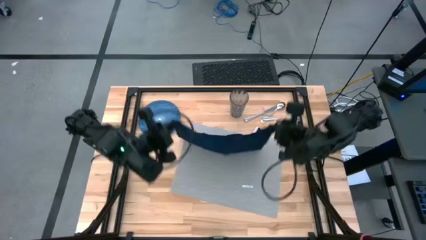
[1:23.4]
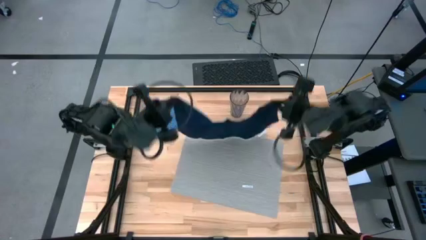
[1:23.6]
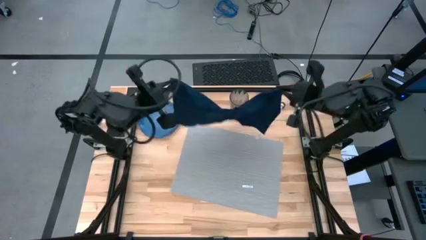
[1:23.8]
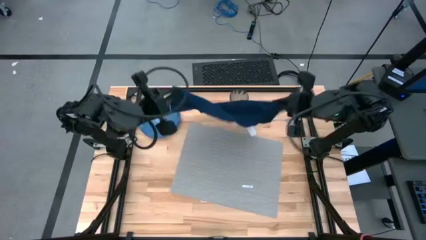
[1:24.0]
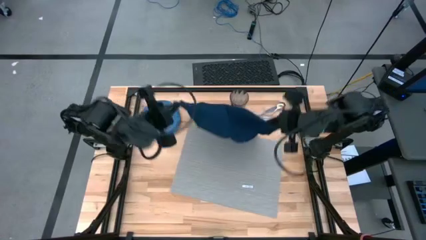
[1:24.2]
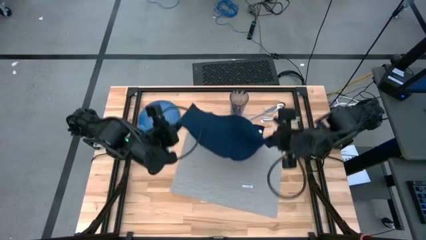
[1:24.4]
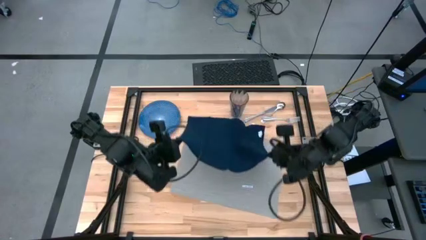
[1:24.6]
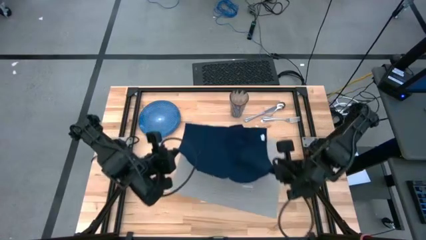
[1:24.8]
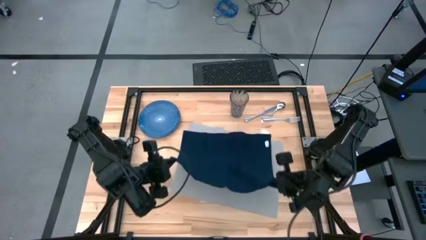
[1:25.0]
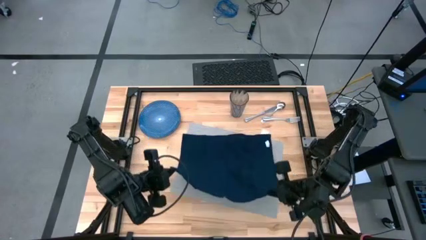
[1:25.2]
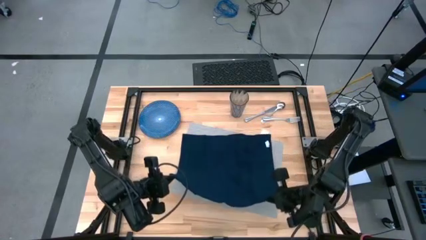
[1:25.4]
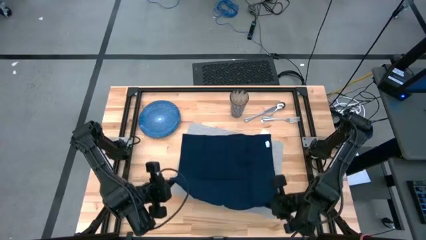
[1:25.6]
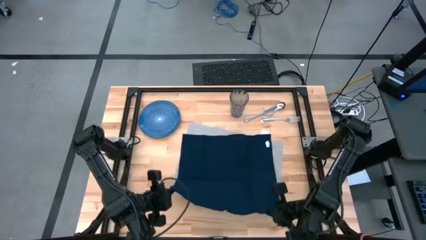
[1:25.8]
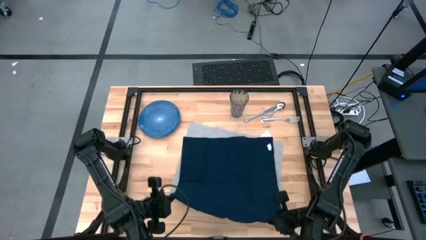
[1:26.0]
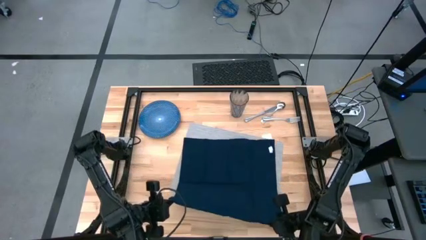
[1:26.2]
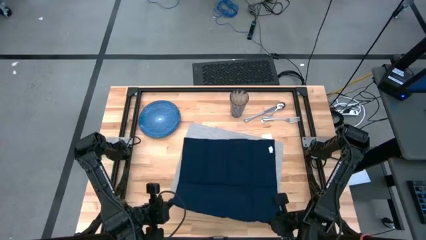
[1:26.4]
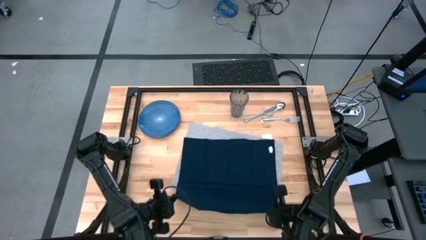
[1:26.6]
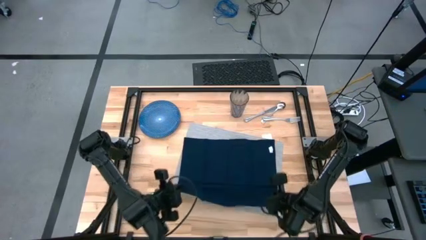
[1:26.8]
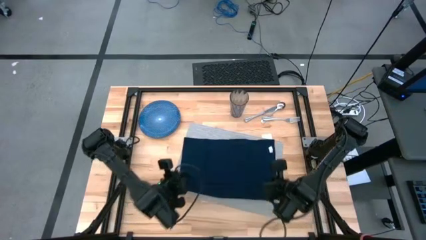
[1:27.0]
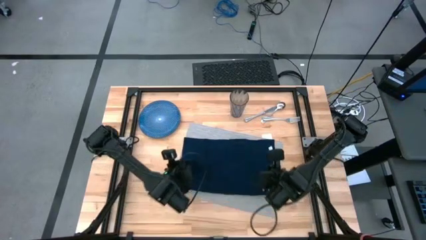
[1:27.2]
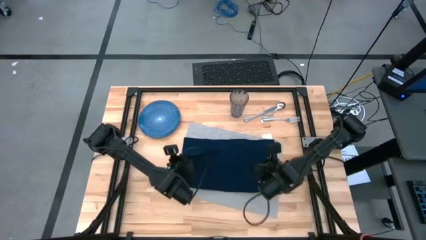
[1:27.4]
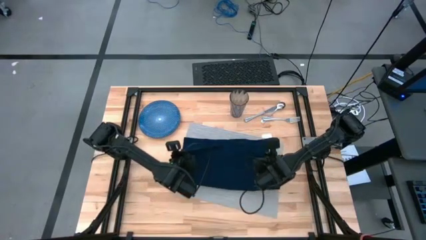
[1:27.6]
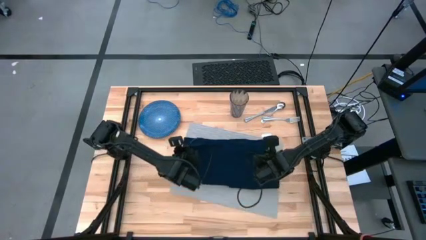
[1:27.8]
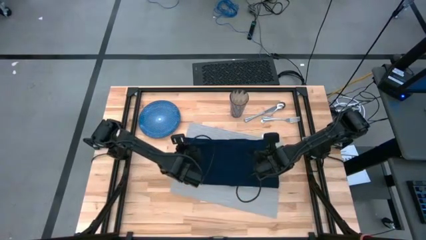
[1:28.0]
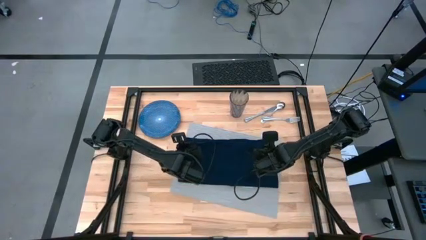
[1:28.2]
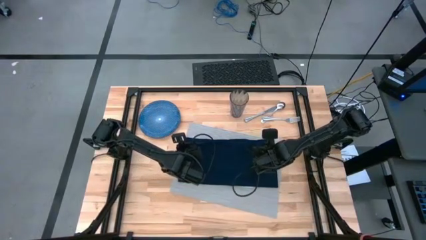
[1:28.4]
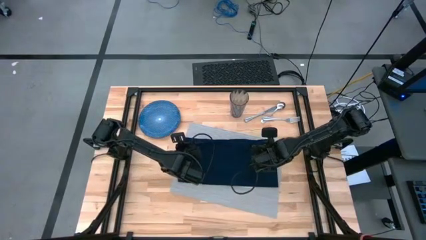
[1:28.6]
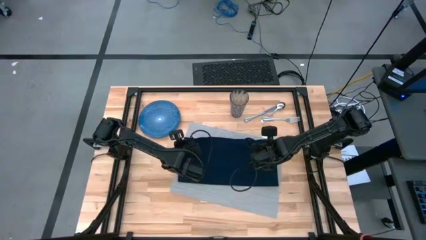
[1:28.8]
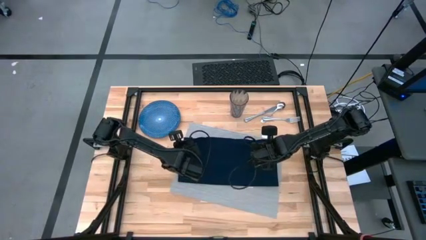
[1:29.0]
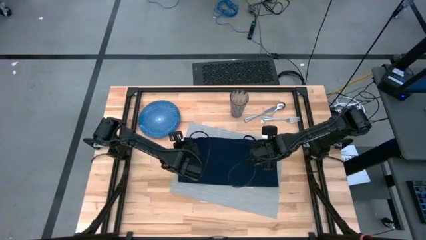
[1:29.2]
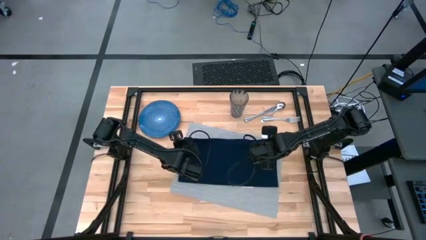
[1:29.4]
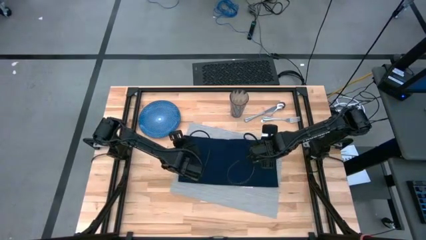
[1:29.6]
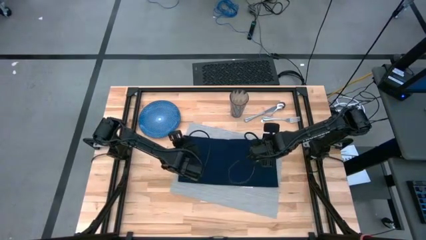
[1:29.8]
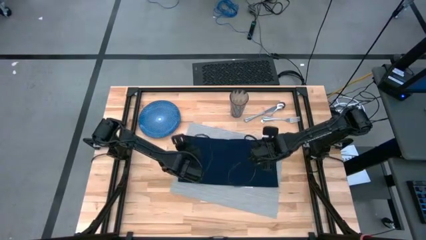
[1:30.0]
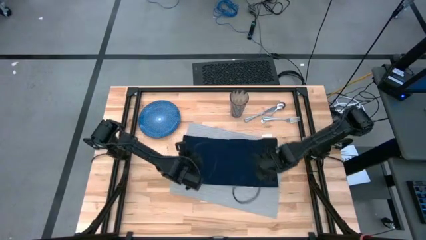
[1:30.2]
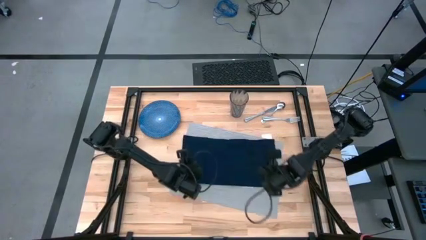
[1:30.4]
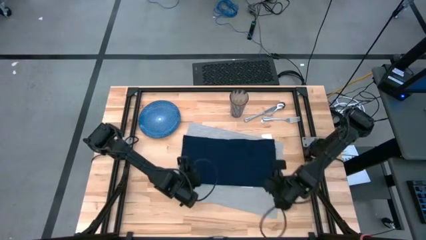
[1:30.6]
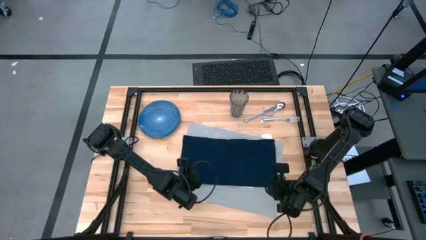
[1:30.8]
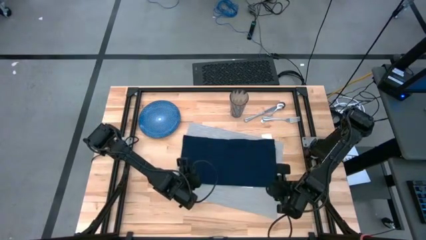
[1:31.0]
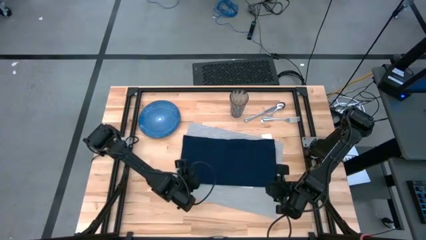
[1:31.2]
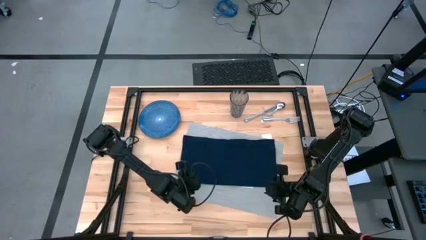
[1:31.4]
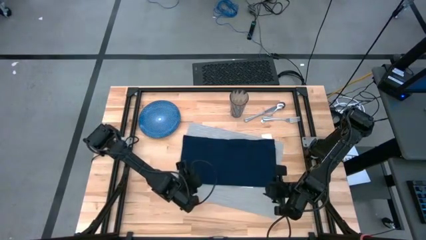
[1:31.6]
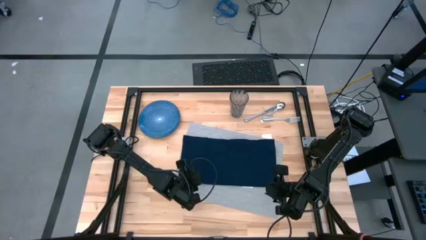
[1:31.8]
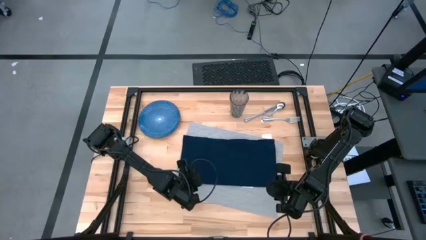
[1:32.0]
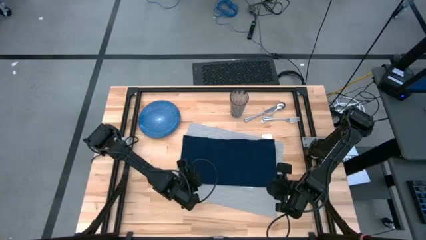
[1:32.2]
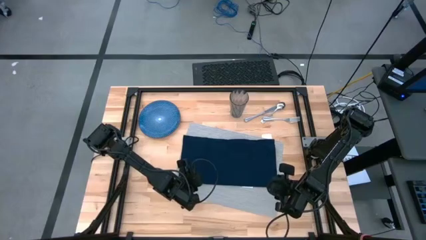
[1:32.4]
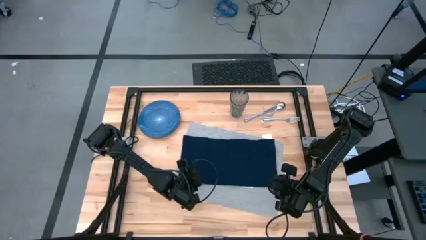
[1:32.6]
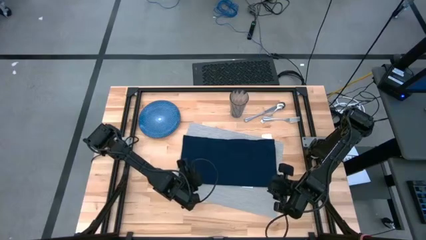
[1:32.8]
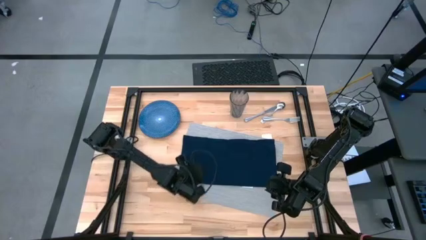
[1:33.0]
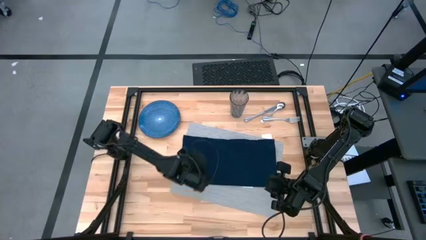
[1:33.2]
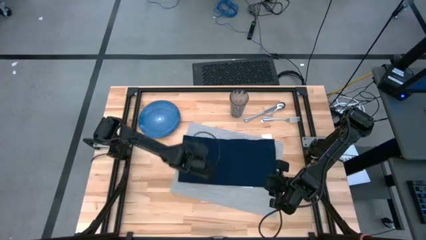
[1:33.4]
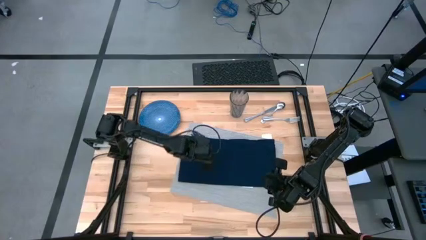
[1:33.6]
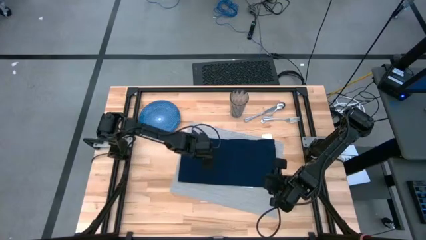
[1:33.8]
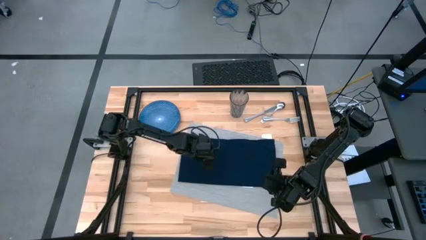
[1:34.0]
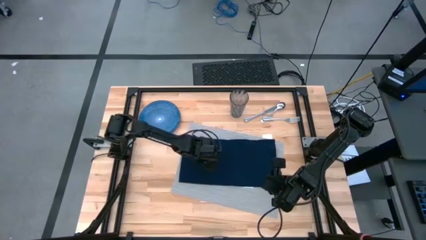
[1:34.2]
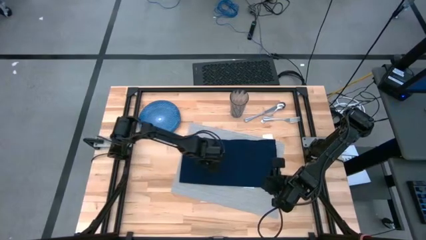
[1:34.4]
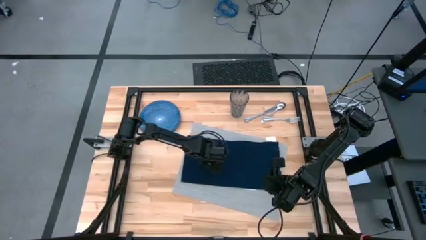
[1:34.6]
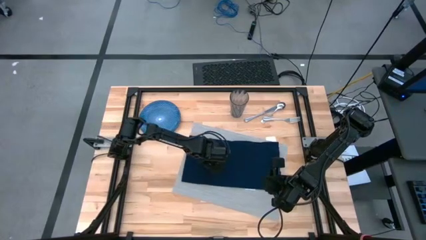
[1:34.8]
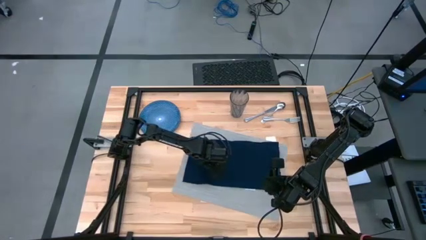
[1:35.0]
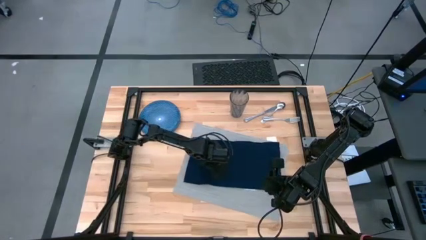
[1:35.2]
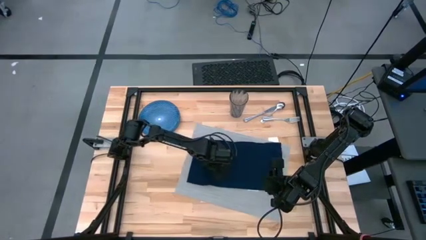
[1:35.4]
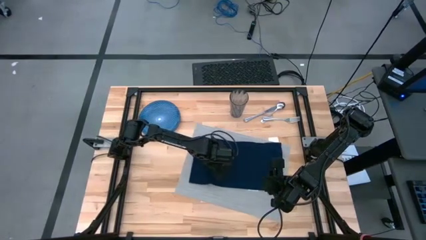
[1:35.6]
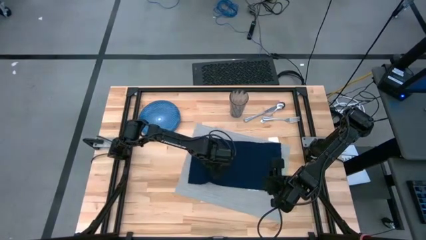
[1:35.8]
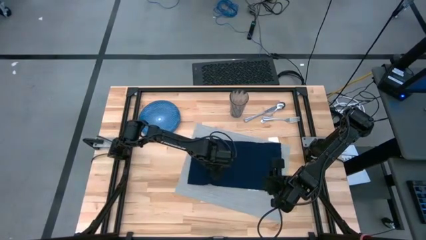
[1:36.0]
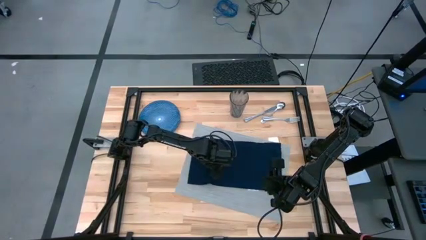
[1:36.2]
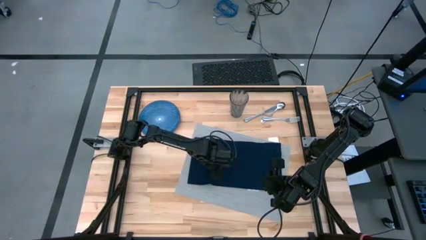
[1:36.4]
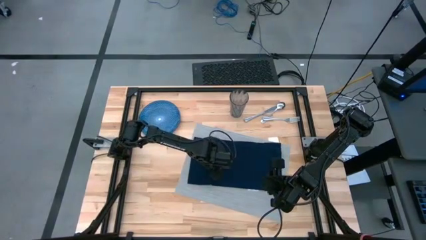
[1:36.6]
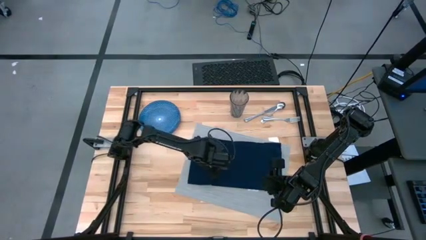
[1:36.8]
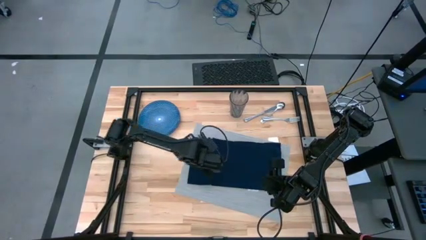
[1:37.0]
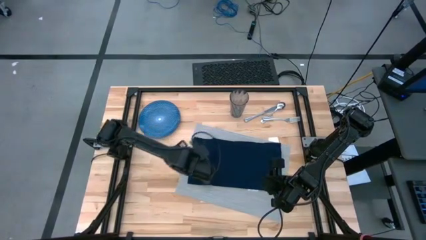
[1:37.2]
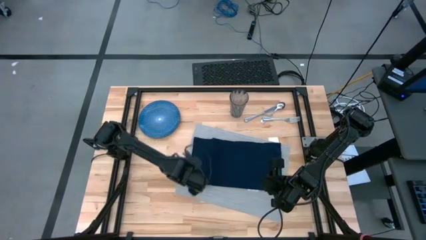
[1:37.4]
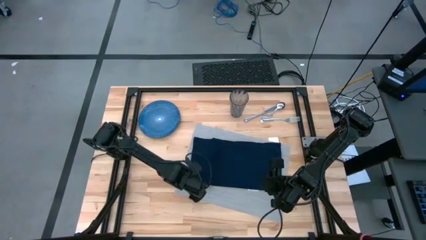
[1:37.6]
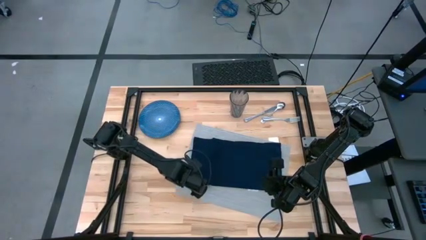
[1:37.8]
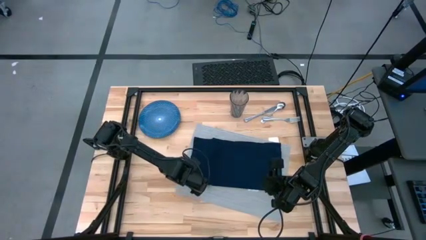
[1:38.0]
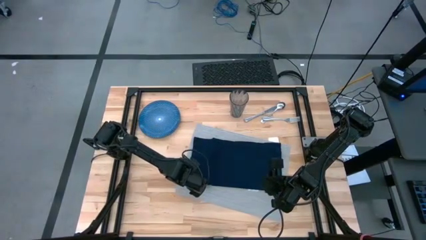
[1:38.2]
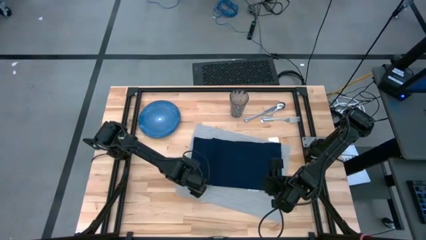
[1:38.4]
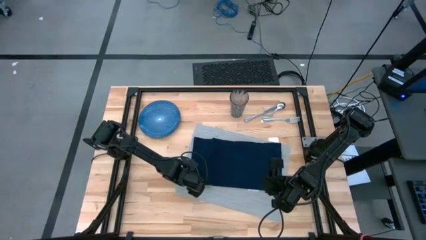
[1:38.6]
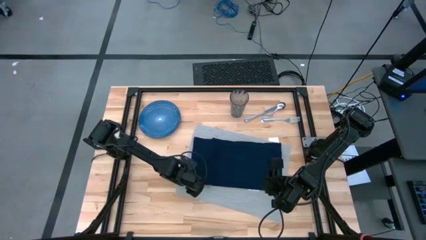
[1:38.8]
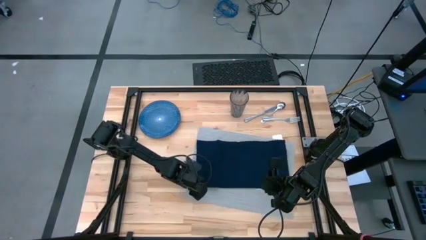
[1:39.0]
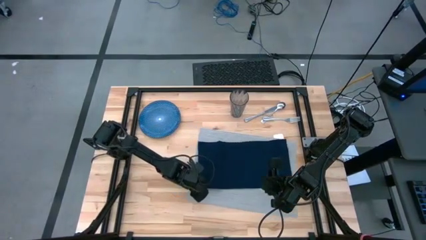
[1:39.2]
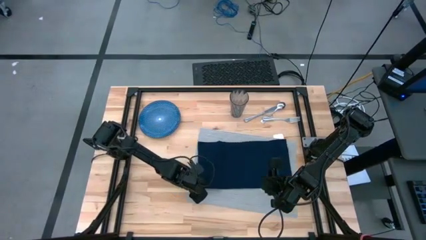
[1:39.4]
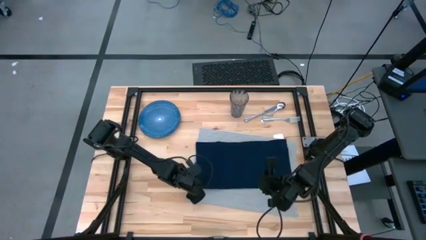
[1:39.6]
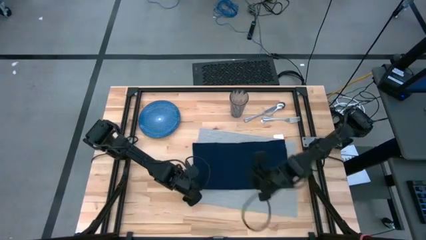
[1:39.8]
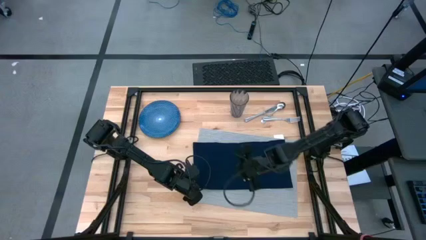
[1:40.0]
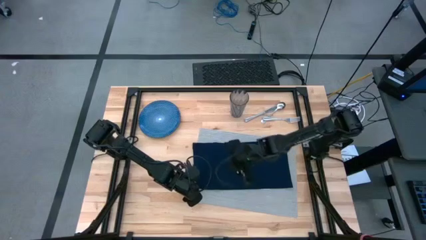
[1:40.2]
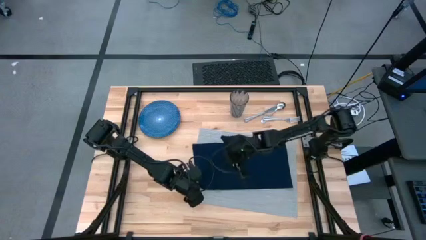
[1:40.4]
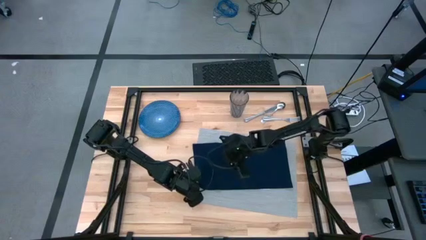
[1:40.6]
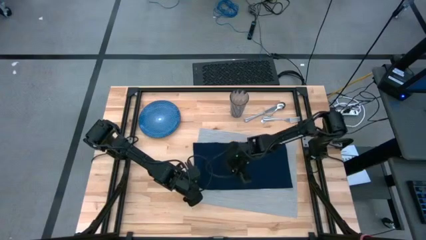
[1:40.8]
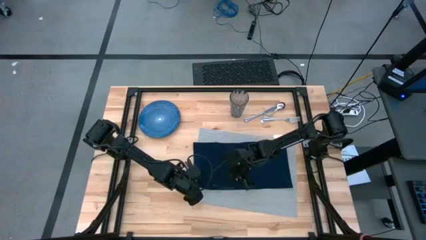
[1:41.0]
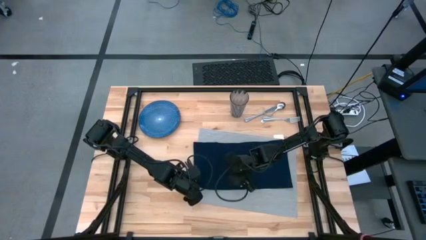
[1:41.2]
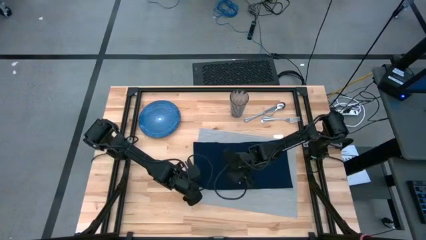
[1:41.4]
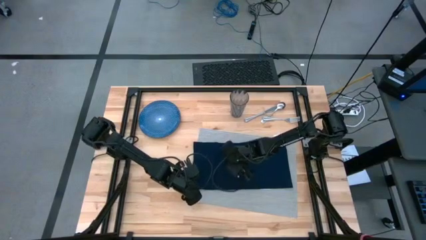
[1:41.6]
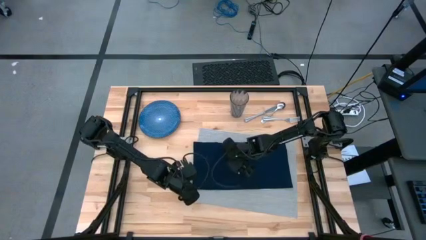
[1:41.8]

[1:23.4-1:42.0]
Task: Set table place
Fold the blue napkin
